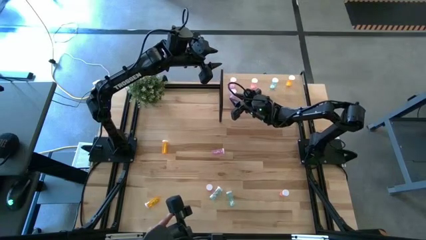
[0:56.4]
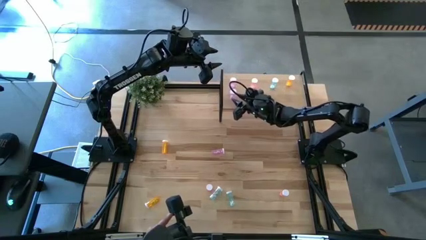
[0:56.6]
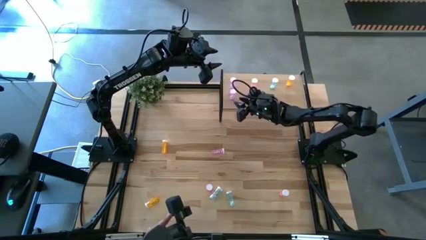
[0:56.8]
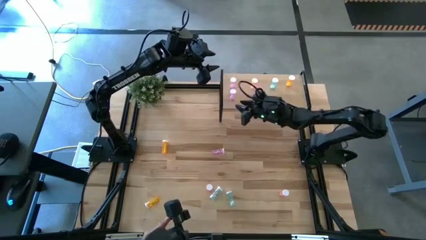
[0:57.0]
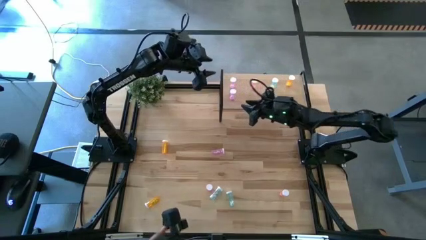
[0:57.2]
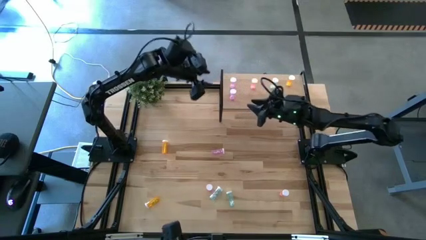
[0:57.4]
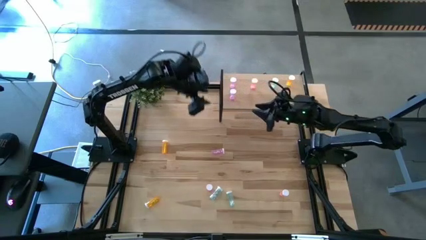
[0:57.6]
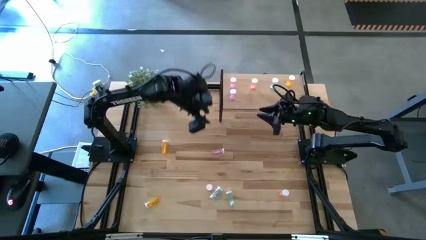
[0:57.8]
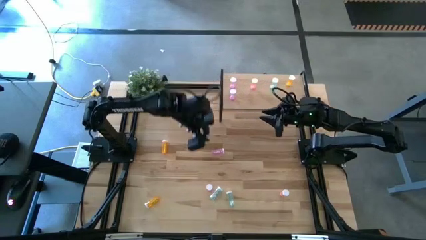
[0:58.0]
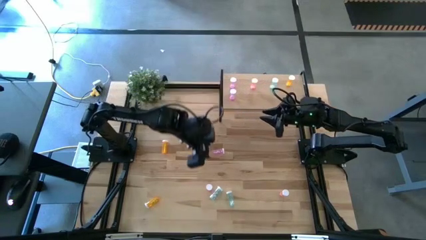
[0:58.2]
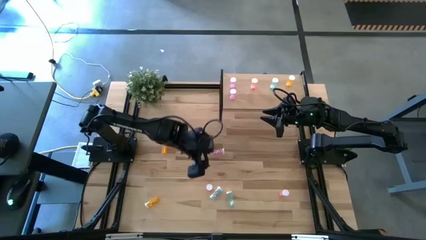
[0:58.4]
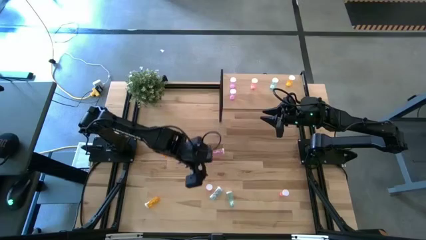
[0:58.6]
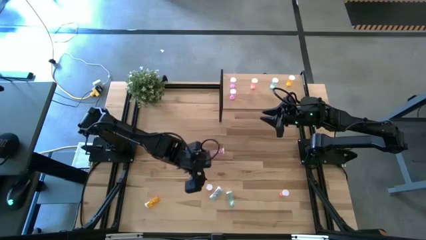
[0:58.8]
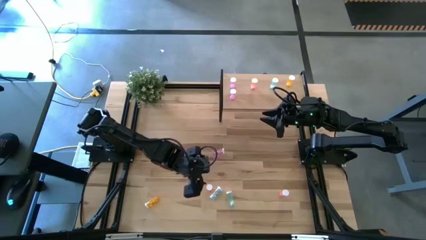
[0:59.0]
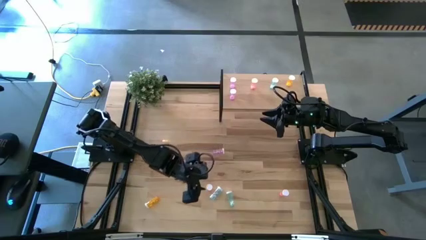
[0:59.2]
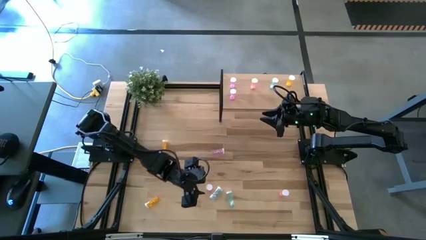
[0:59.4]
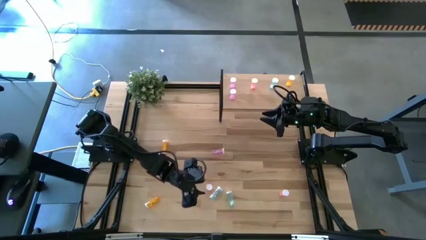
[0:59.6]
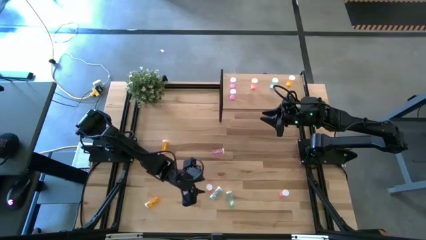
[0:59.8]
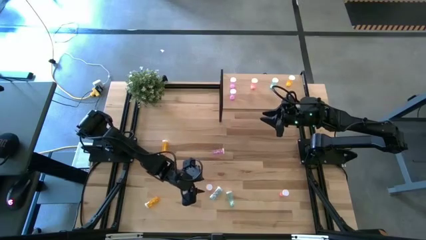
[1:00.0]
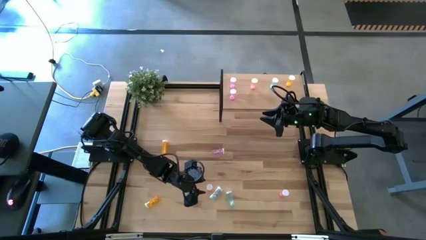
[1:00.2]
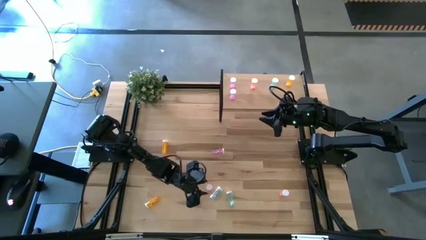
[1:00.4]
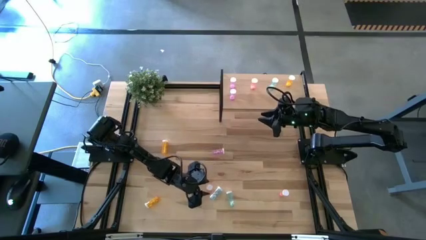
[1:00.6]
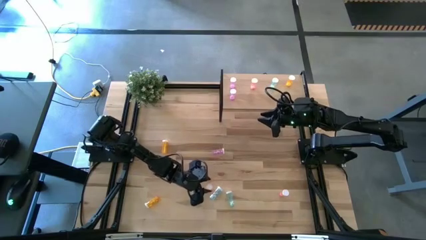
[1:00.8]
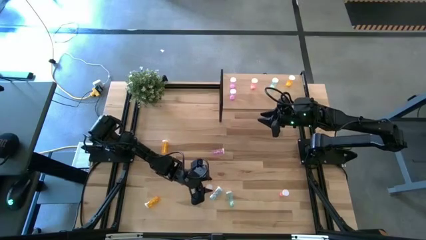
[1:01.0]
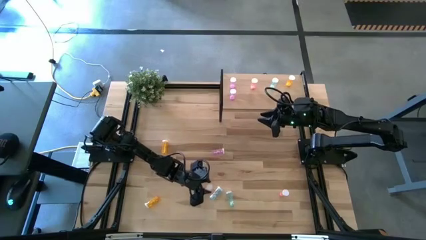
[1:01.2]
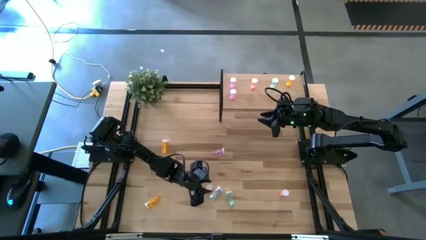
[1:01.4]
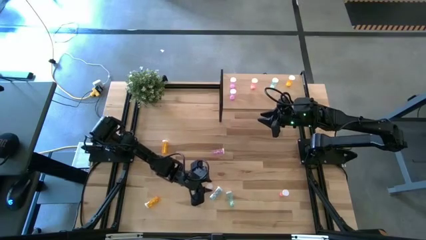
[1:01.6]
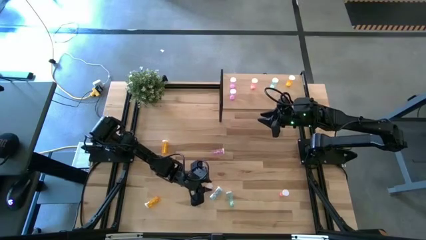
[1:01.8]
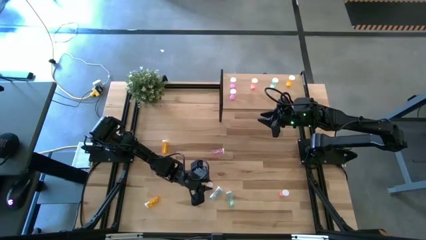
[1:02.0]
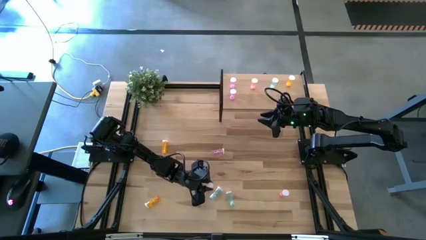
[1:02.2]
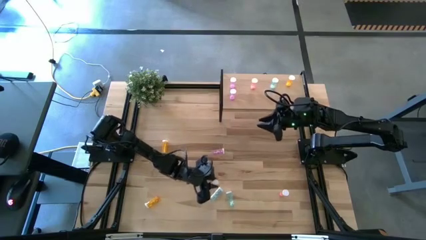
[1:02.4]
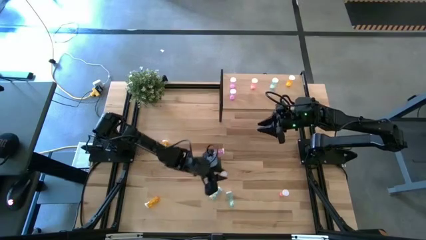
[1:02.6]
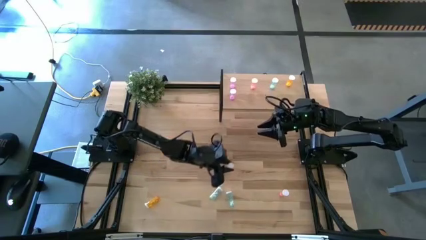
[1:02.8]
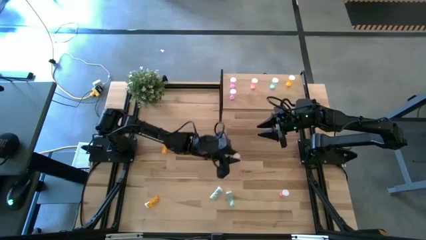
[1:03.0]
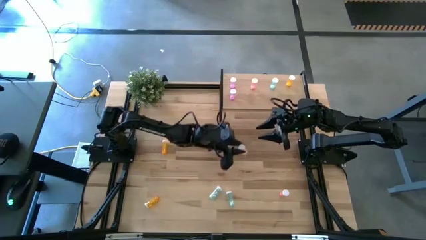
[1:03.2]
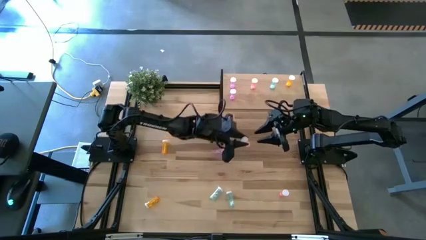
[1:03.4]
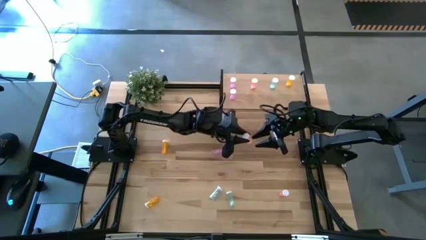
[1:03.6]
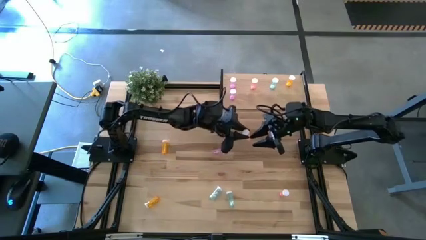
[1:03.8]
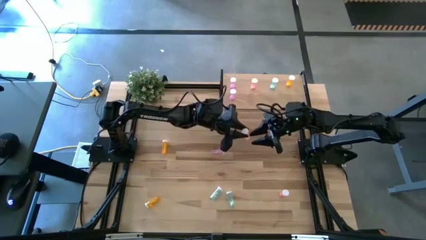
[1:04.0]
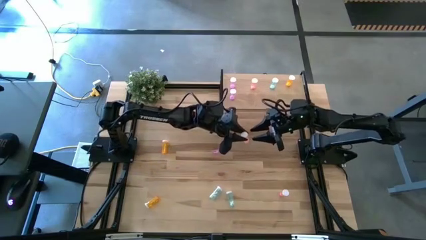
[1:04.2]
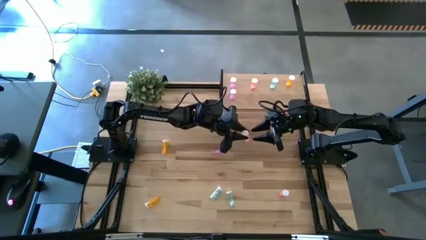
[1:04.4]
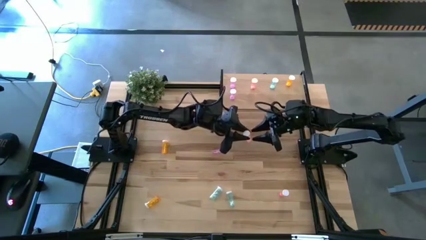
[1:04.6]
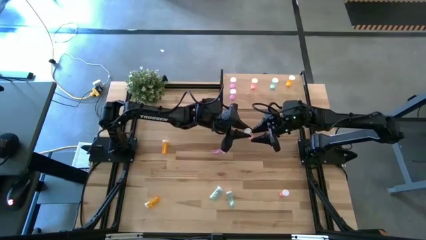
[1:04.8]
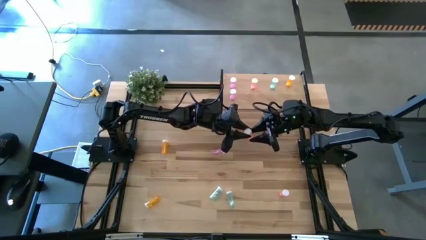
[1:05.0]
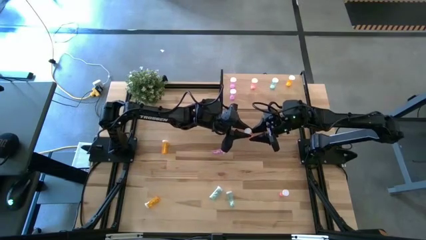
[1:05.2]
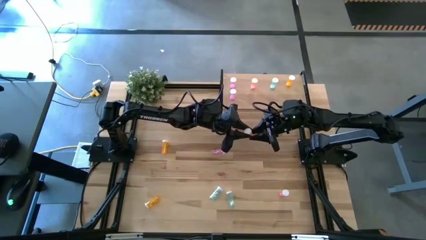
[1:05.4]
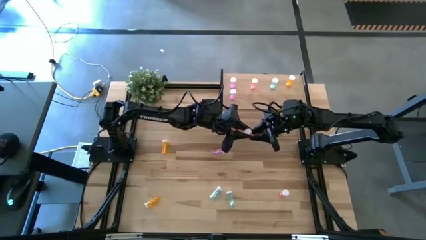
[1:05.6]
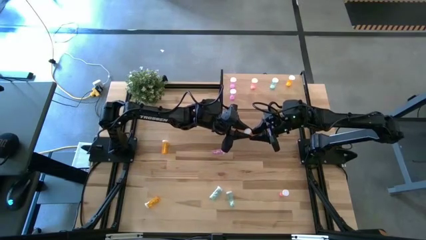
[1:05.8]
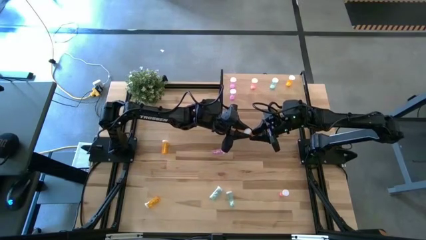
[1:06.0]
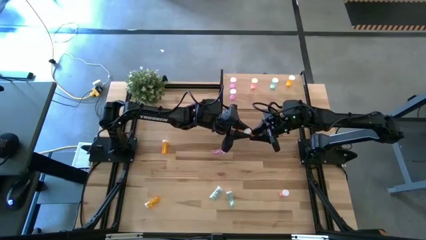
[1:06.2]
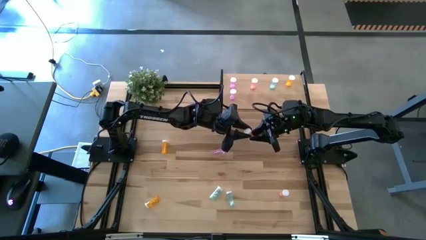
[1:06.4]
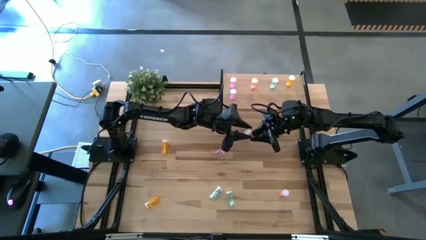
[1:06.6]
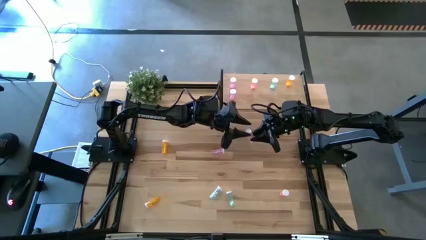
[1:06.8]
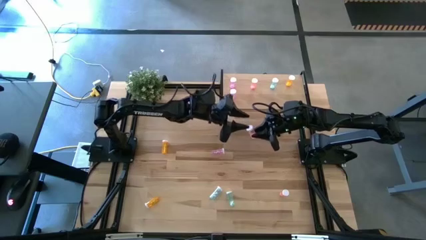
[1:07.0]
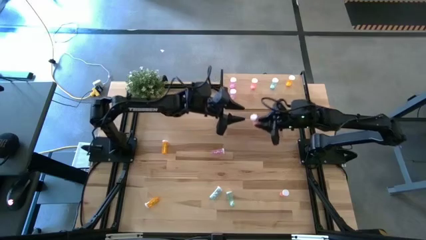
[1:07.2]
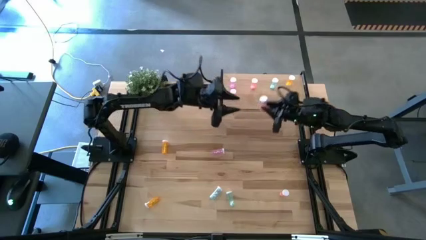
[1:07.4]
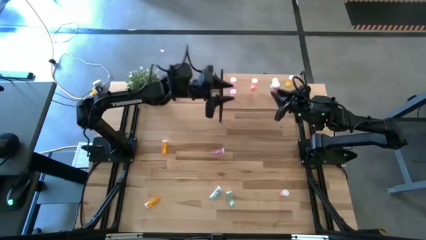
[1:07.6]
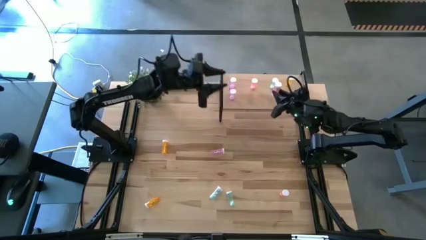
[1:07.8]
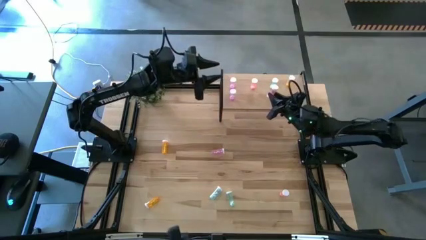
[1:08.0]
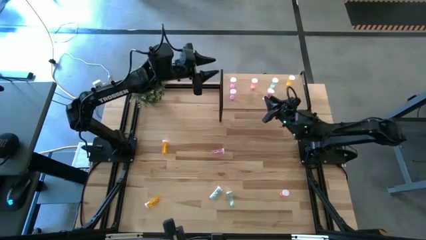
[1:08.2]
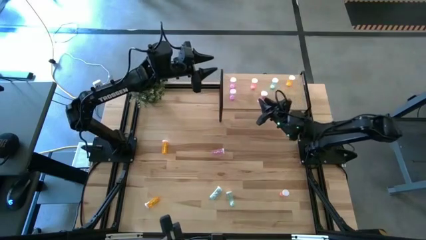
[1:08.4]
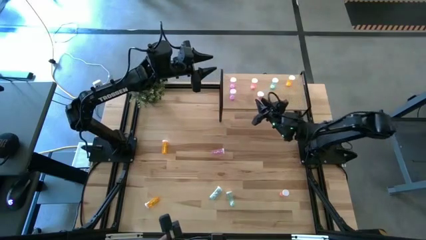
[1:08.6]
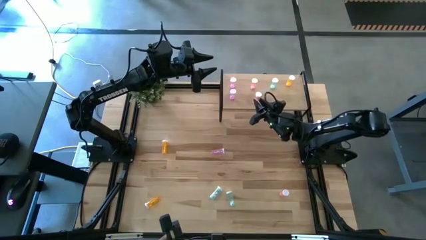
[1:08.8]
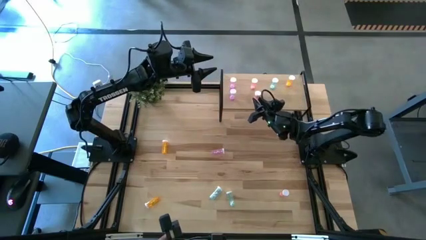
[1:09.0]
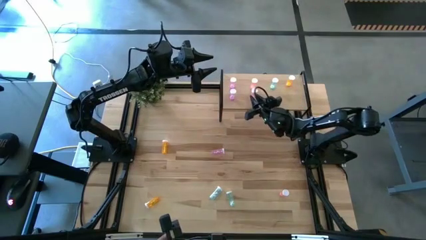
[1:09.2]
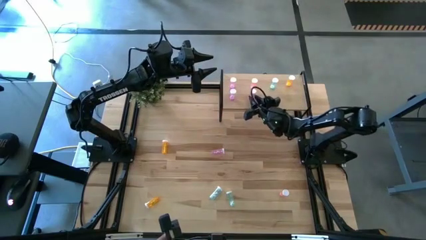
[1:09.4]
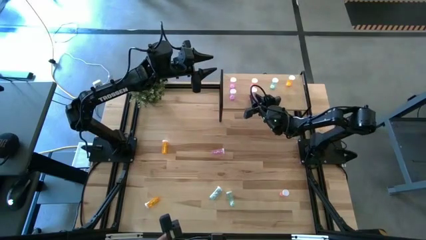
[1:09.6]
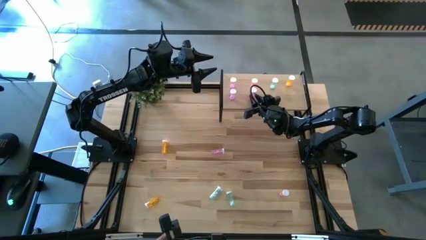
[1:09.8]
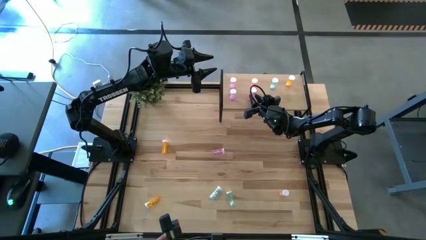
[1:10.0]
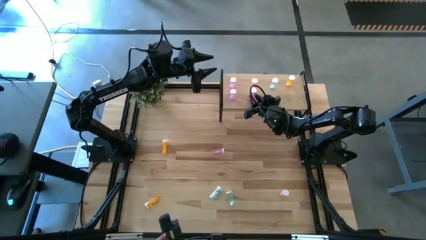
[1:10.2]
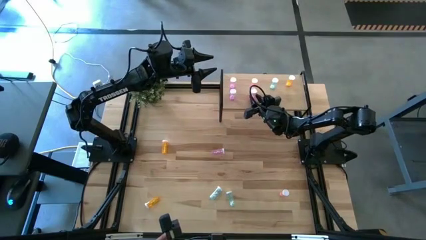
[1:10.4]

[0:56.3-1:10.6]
Task: Pick and place medicine bottles onto shelf by color
Put the left red pill bottle on the shelf aligned with the other red pill bottle

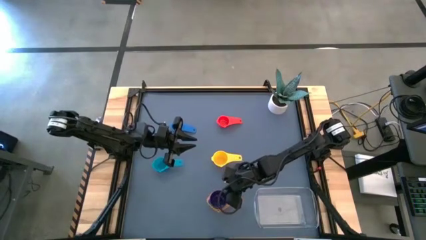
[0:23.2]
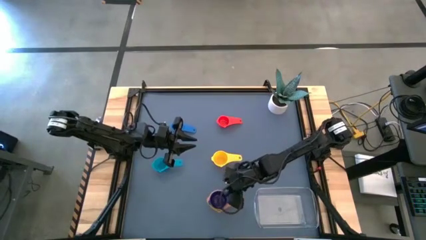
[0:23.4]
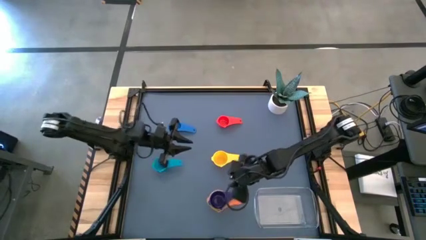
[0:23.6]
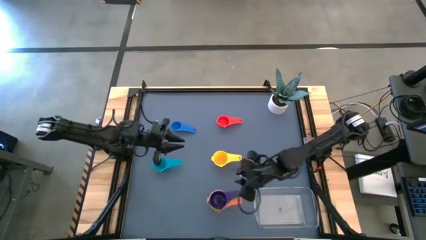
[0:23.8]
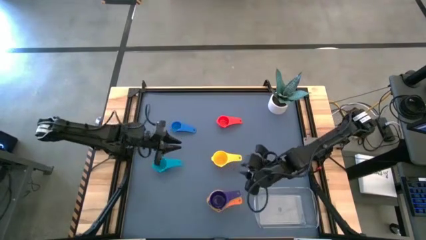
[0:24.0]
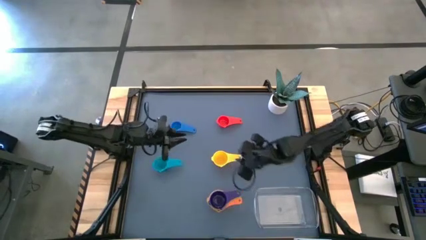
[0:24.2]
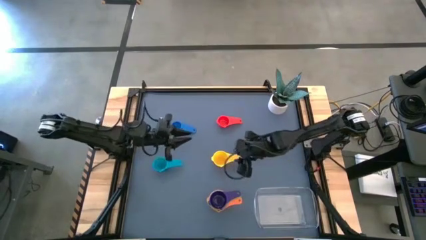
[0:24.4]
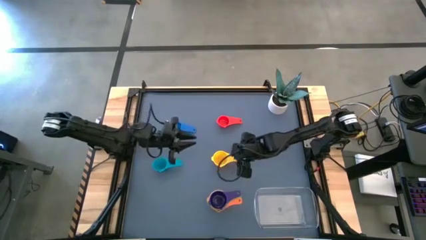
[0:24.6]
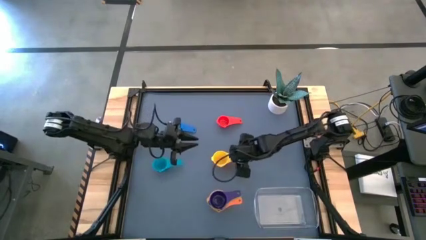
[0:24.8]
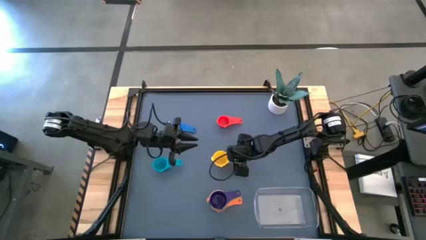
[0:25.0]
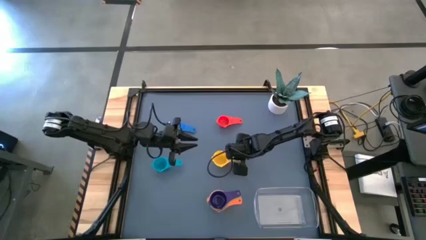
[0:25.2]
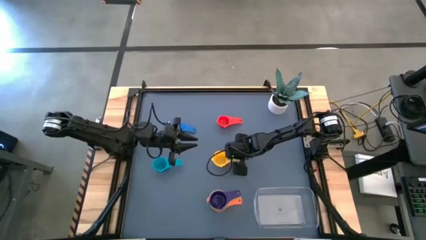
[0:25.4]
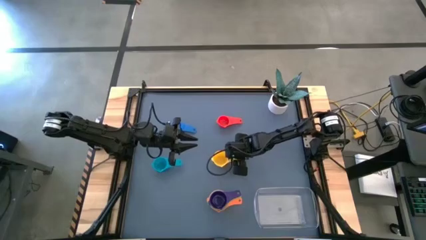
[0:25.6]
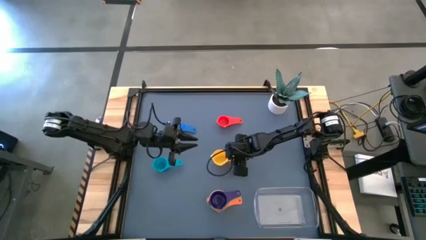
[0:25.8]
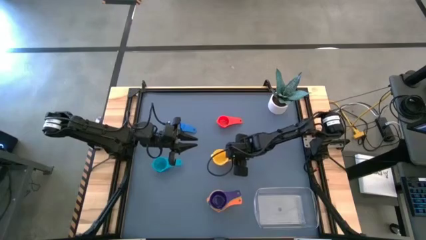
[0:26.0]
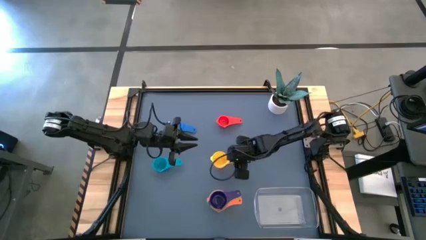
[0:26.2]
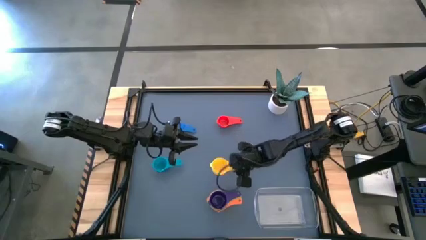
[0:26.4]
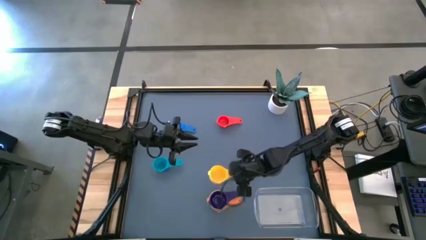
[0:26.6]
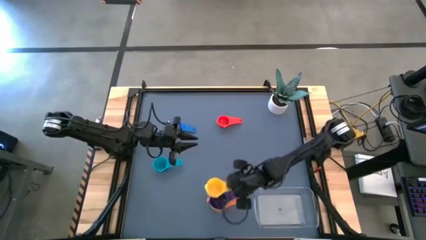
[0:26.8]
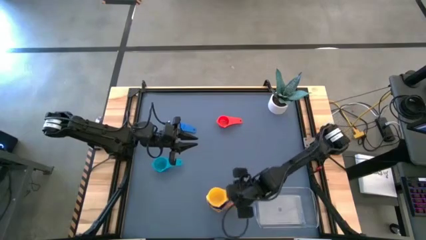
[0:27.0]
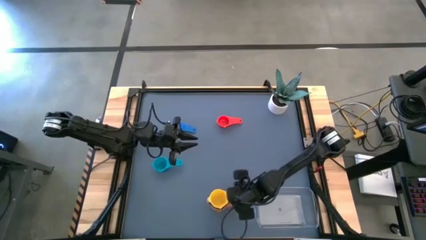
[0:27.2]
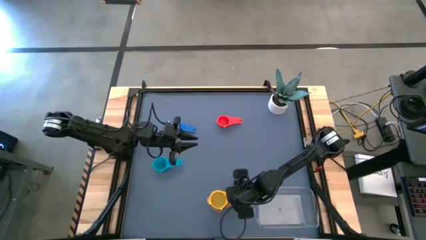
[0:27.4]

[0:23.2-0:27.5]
Task: Nest measuring cups in basket
Stack the yellow measuring cup on top of the violet measuring cup
